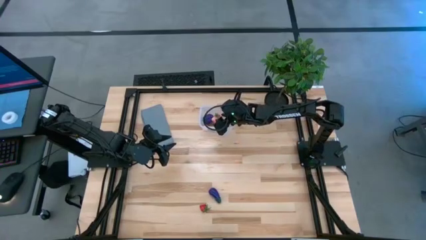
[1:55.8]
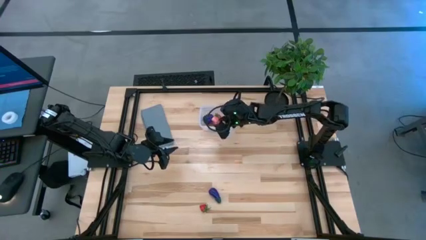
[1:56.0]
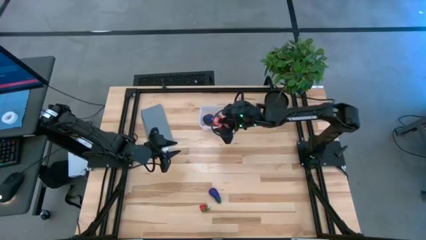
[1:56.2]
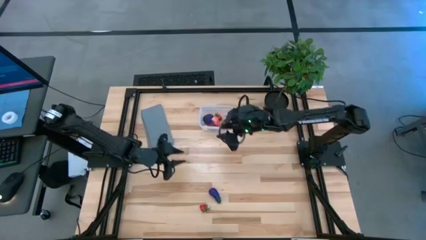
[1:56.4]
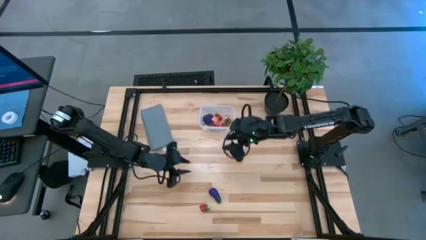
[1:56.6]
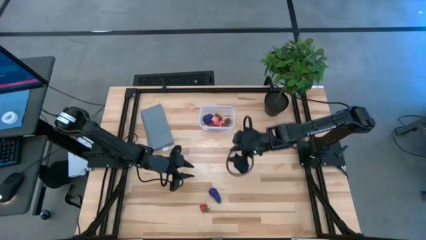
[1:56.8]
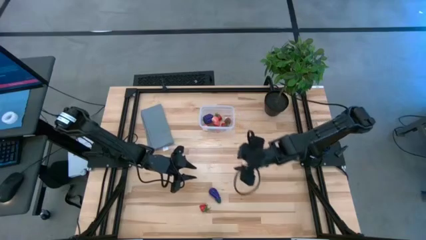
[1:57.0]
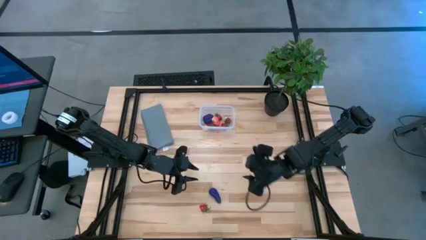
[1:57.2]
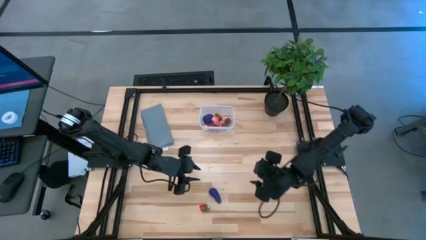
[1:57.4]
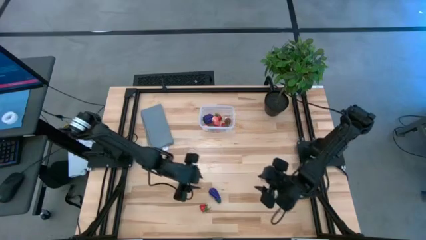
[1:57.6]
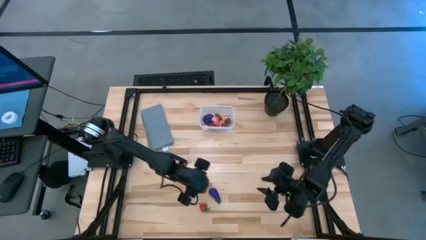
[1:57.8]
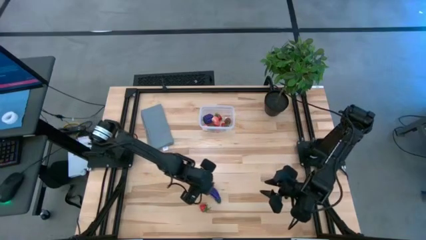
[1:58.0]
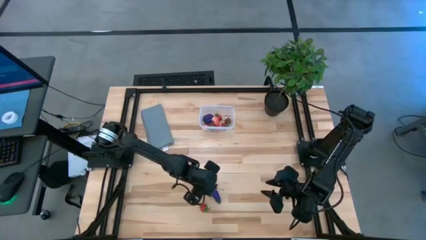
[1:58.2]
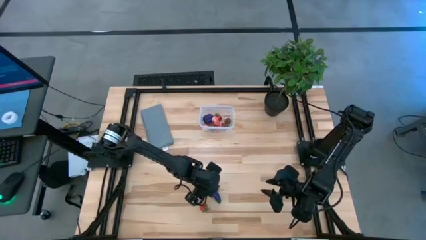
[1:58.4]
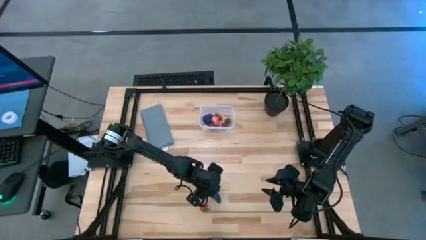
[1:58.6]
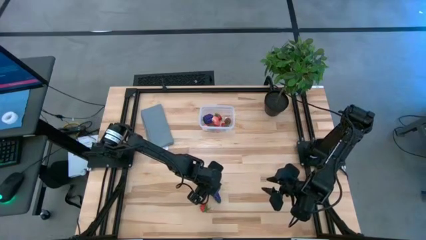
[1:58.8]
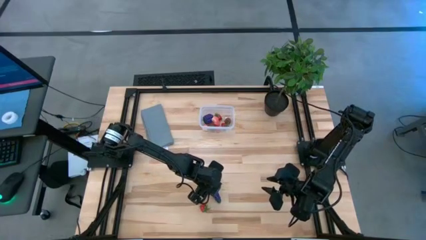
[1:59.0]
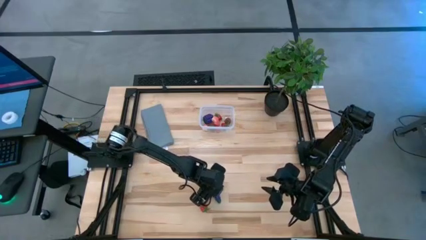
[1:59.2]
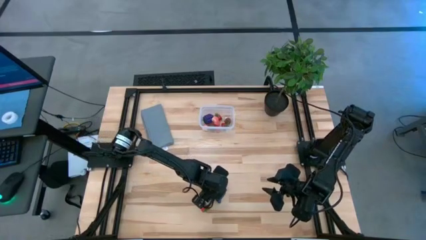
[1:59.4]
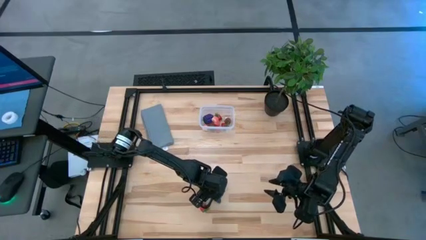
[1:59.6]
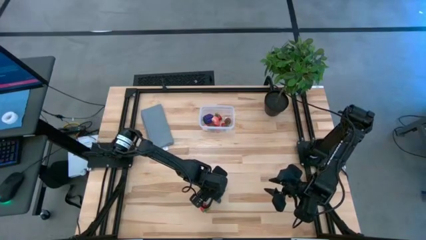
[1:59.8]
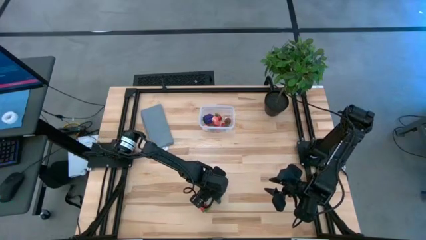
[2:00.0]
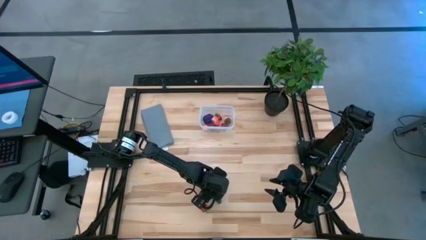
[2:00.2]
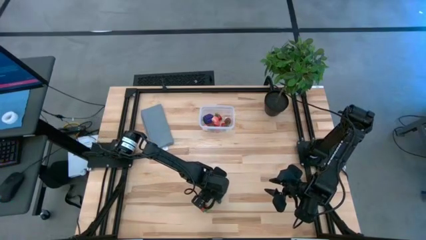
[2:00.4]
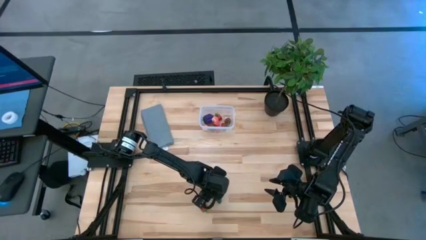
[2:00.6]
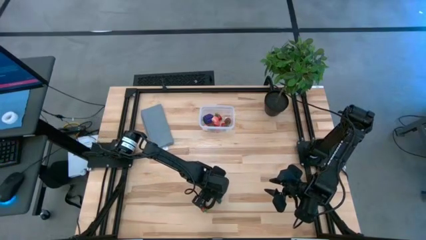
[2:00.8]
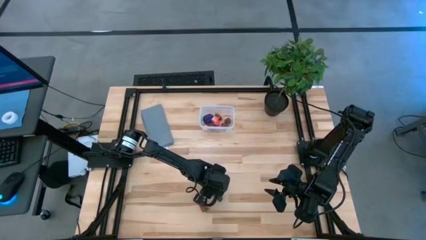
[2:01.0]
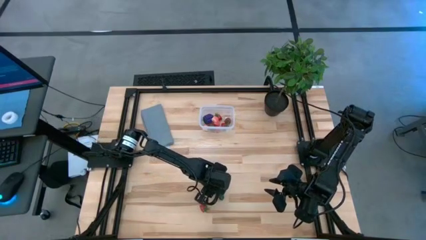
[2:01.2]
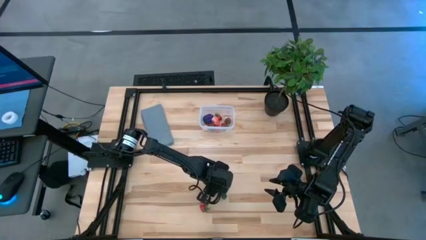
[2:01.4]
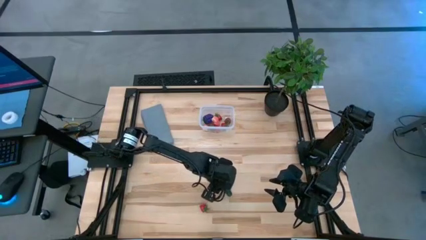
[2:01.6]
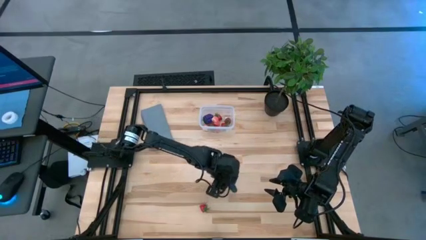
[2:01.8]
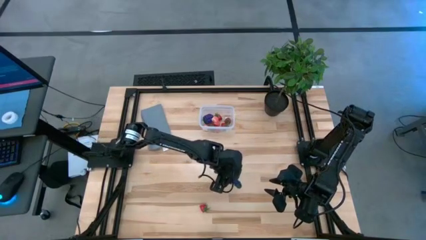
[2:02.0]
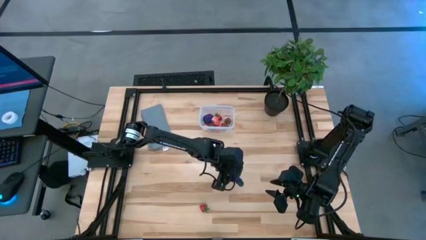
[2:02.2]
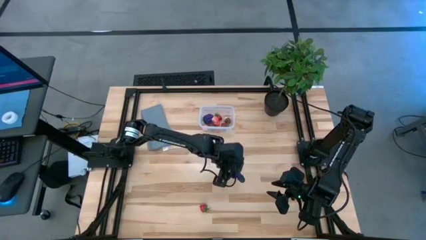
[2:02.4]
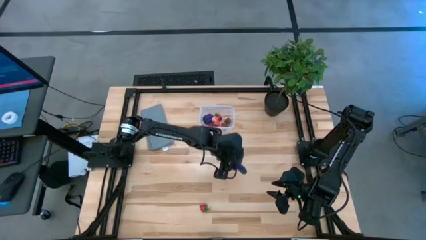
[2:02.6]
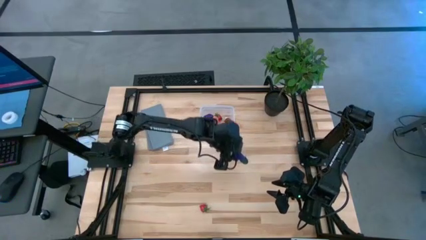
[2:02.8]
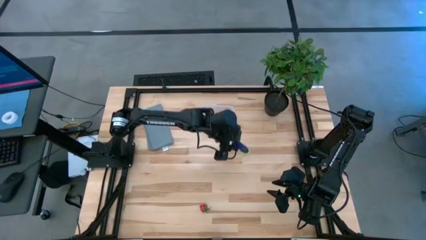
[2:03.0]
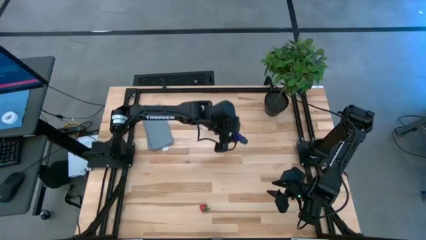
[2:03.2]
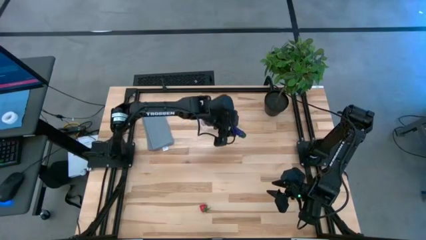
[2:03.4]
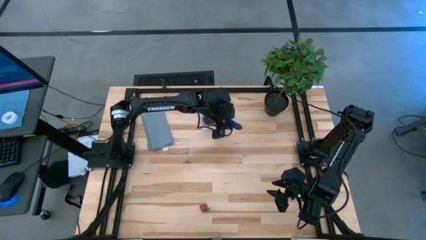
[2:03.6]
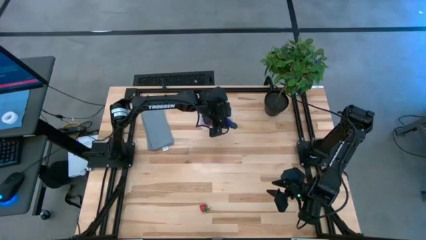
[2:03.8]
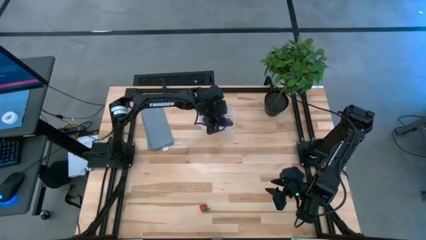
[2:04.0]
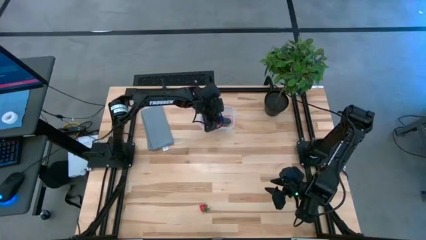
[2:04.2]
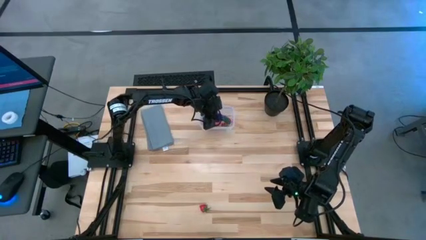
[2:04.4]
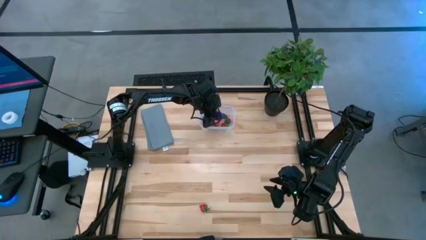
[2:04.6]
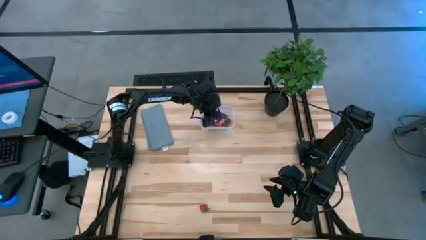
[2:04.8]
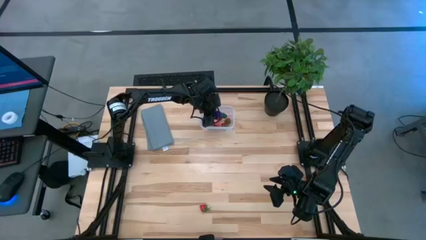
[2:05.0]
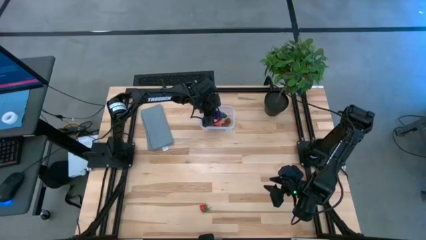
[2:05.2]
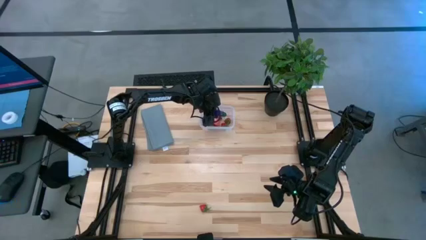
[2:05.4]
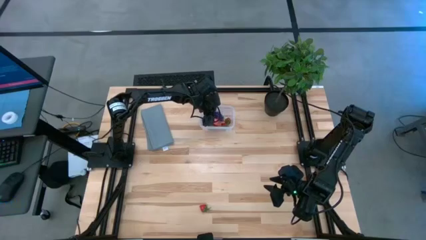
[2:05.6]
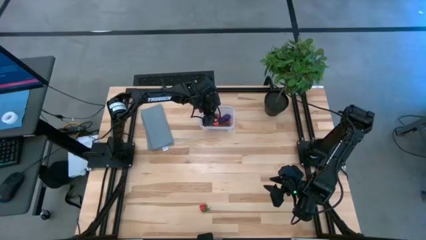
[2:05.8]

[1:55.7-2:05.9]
Task: Pick and placing Produce into tupperware
Put the eggplant into the transparent bin

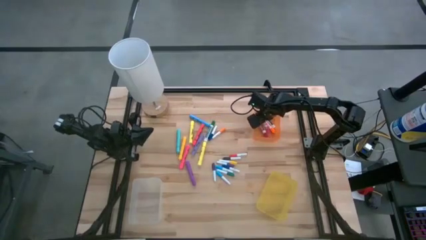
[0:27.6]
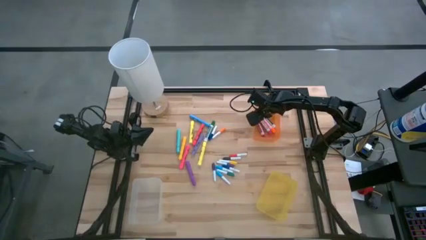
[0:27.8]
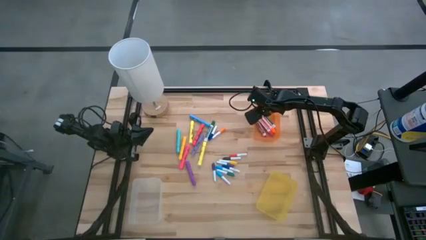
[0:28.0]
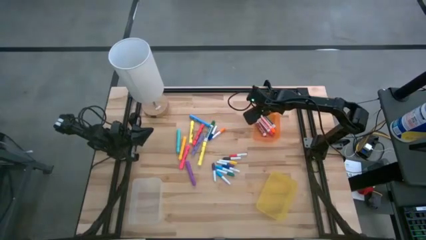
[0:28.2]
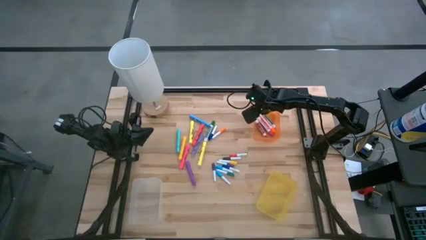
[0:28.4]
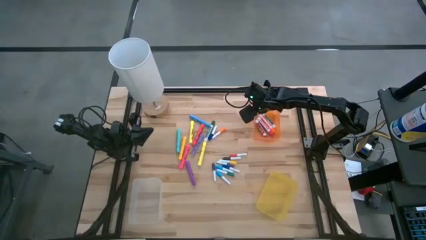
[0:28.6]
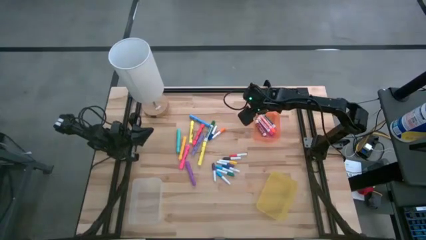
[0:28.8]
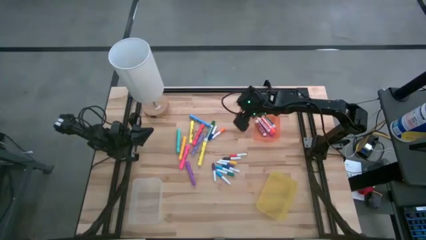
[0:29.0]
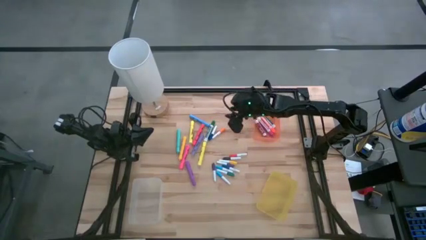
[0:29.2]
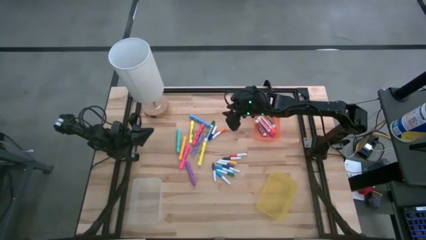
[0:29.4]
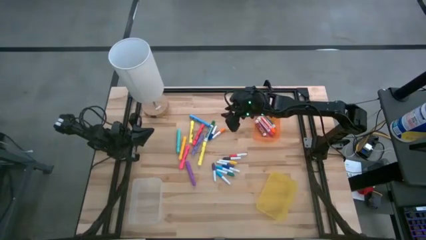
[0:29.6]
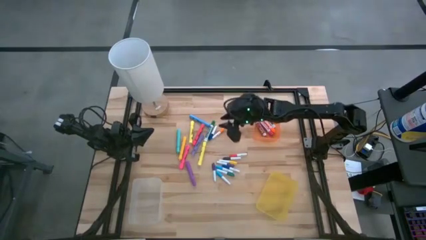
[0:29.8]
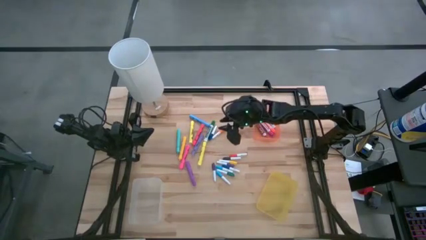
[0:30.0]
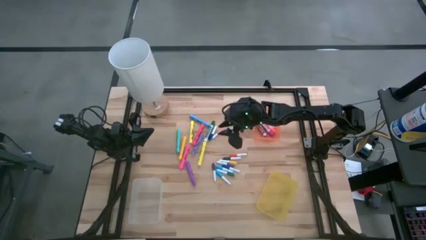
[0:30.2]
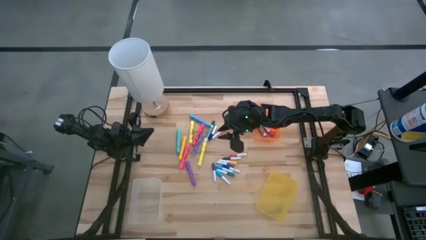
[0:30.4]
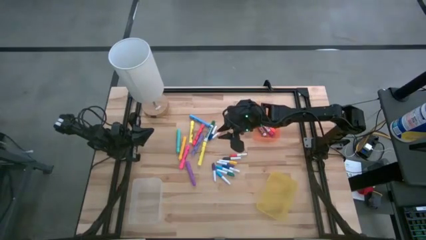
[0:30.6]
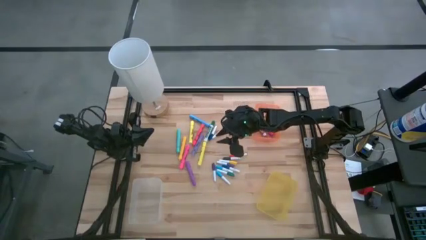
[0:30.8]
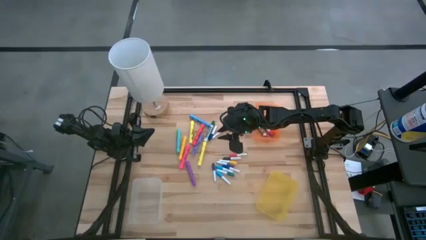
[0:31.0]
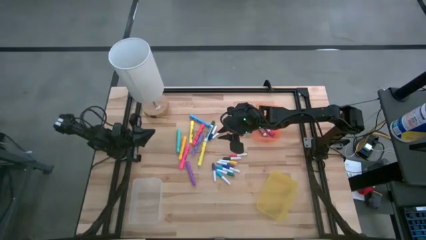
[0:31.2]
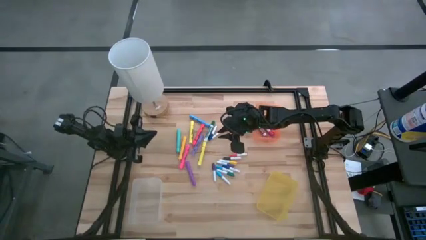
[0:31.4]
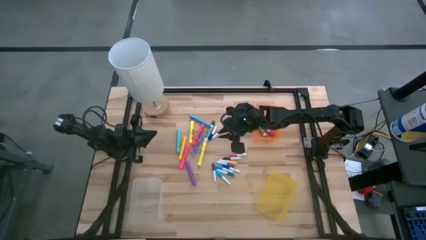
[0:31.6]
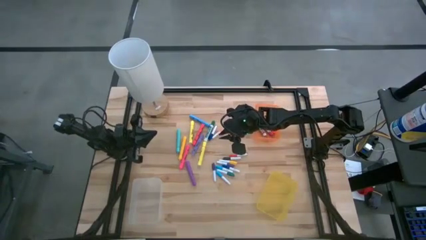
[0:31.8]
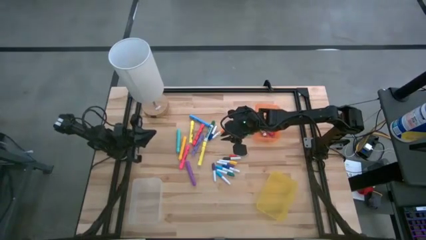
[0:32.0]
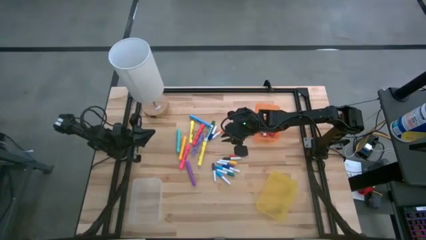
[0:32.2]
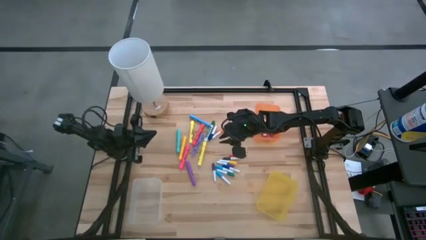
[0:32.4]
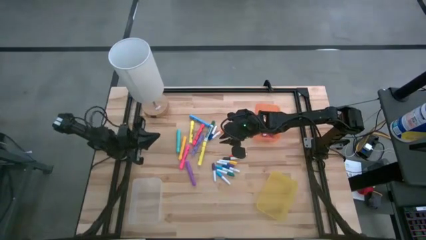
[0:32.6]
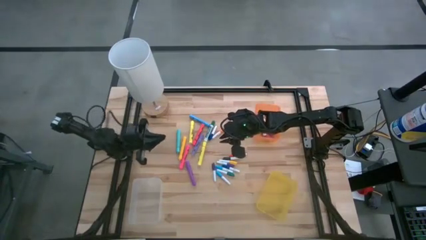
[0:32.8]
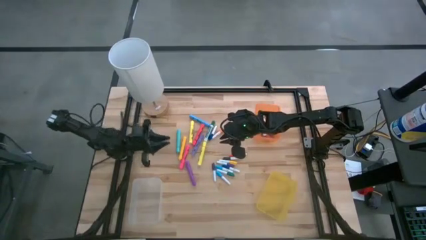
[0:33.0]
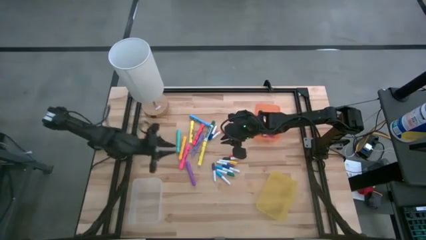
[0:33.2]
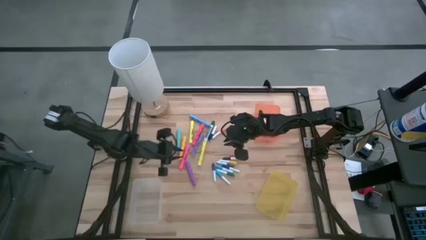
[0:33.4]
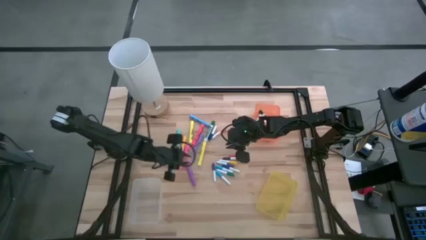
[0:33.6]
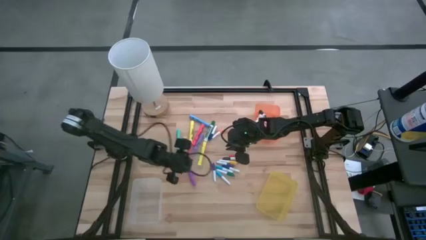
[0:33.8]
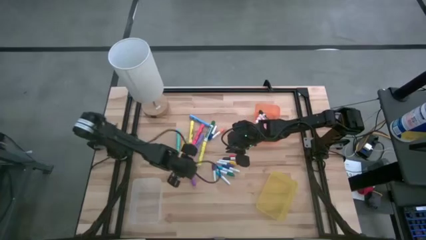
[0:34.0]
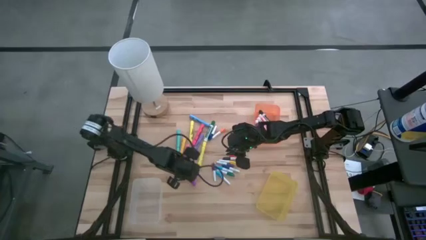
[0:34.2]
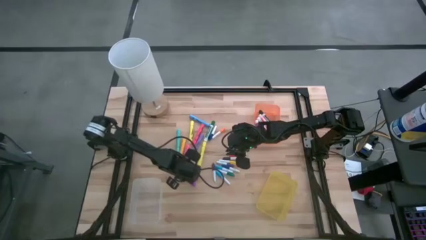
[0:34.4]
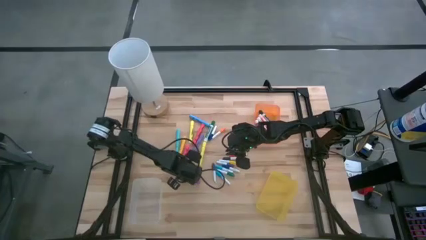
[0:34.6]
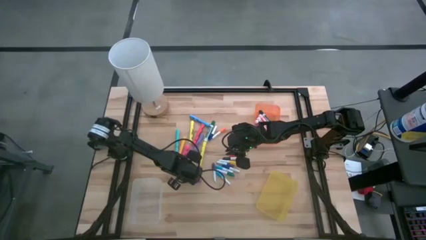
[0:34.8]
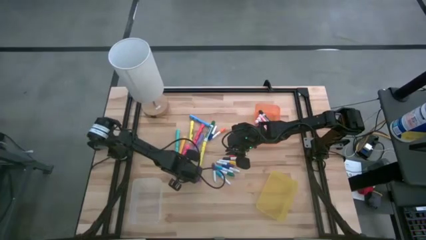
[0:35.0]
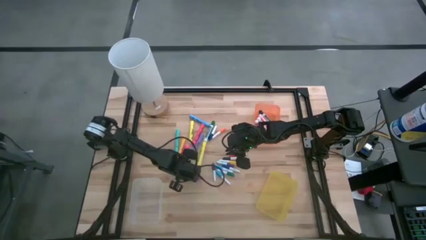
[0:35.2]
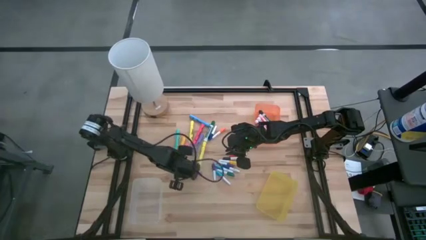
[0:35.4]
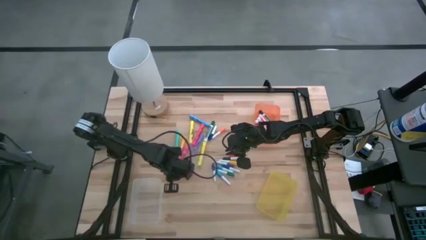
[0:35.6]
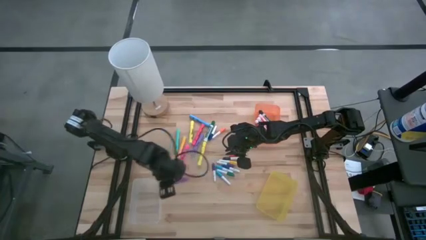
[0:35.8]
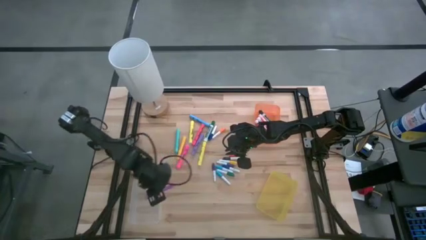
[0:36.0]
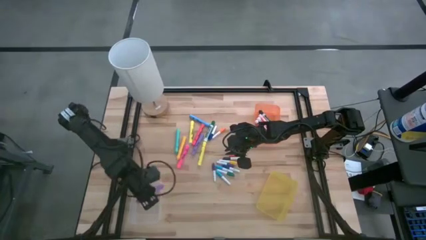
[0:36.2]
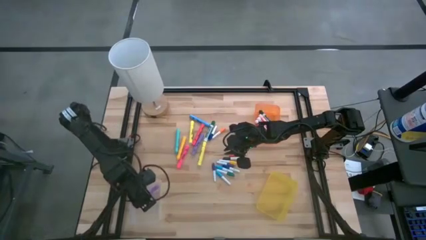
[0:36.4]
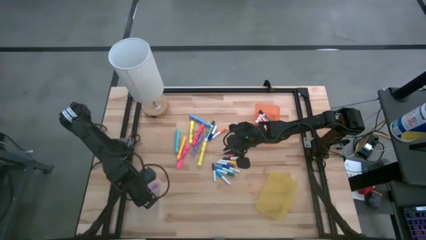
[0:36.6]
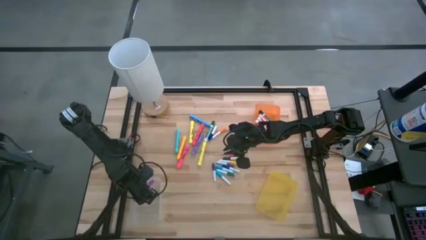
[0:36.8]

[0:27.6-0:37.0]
Task: Pick & Place Markers
Put the violet marker pen into the transparent bin
